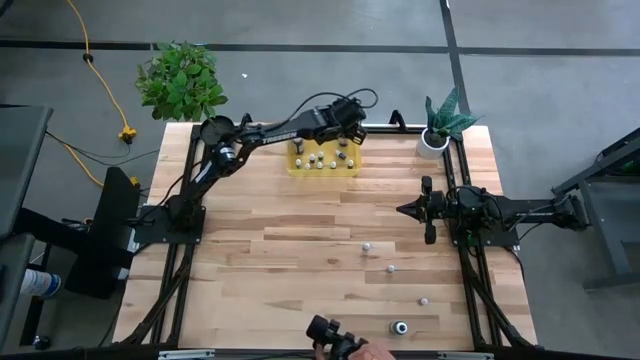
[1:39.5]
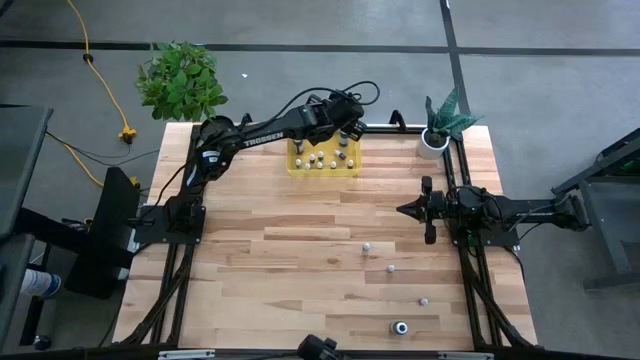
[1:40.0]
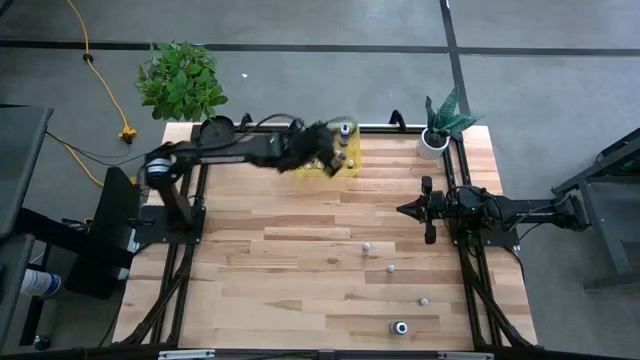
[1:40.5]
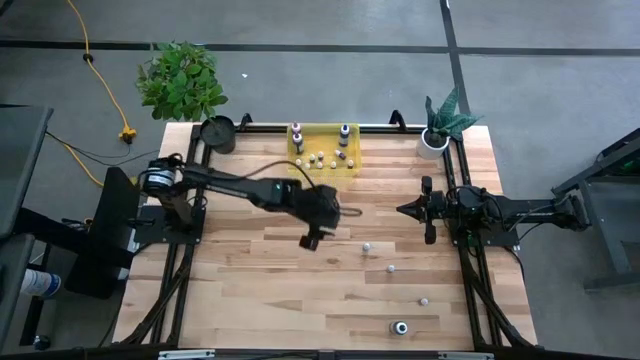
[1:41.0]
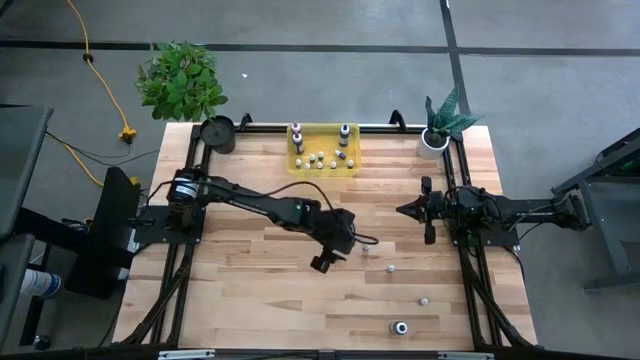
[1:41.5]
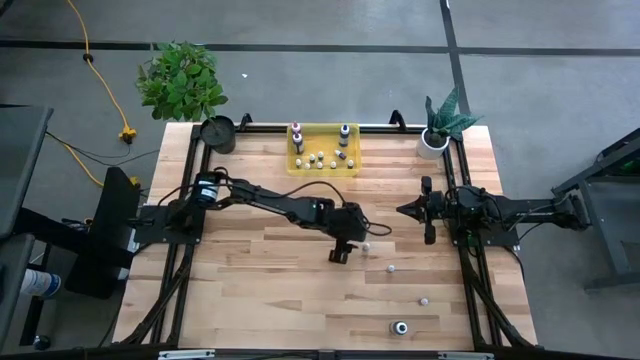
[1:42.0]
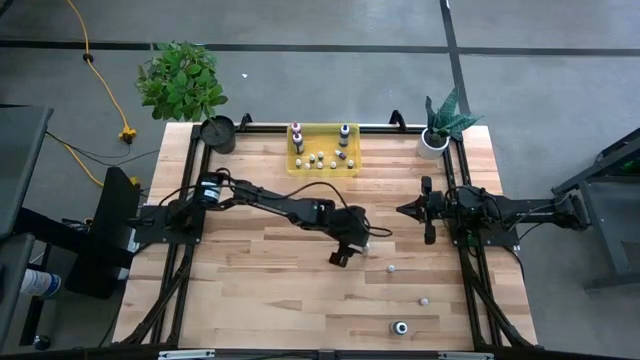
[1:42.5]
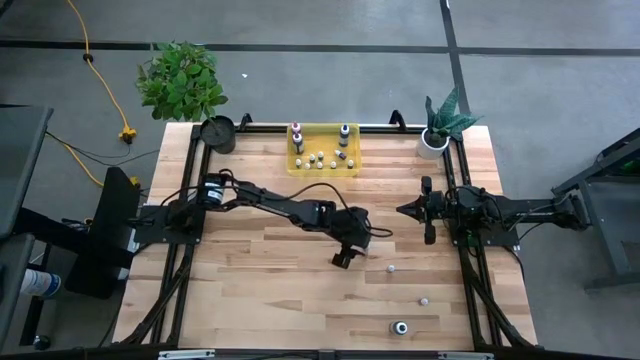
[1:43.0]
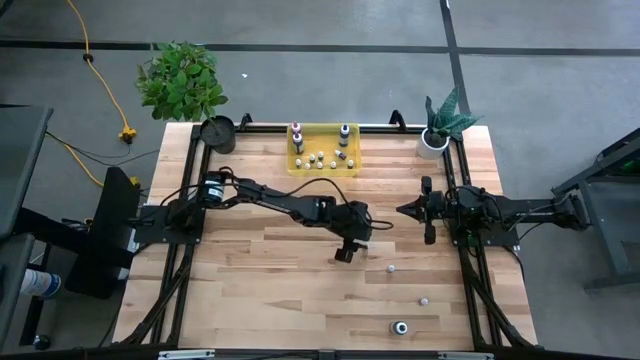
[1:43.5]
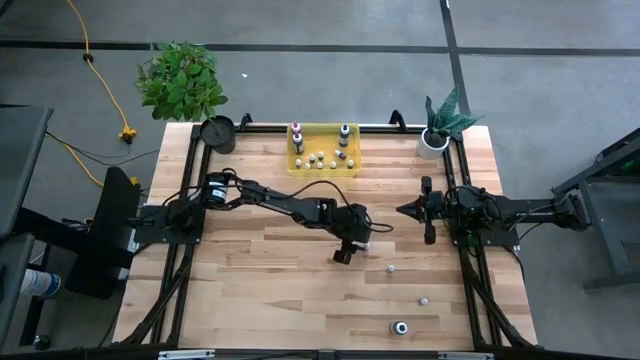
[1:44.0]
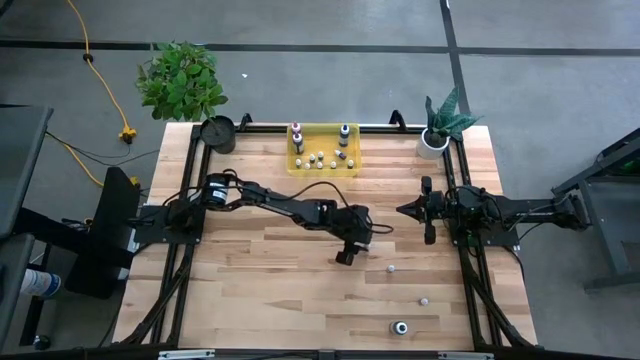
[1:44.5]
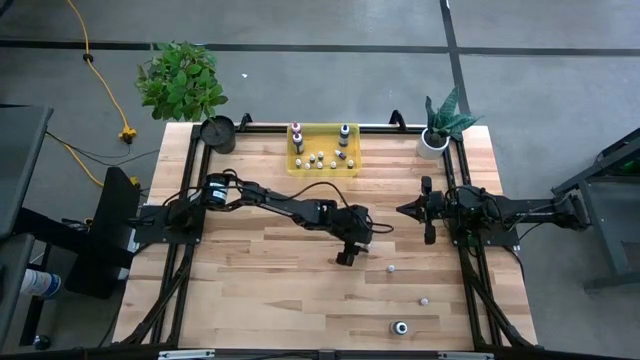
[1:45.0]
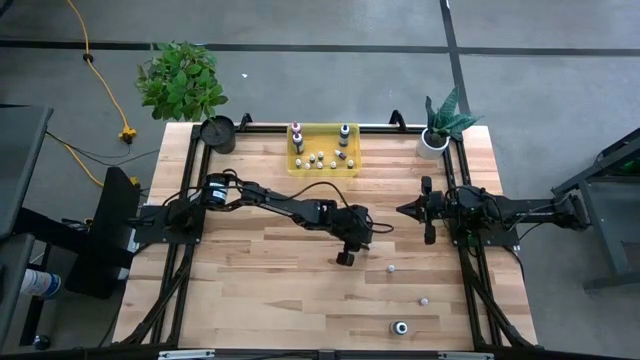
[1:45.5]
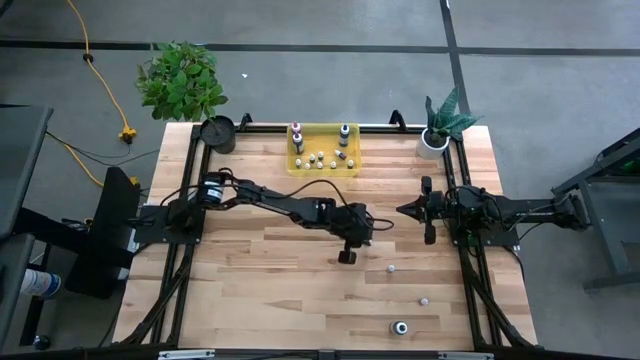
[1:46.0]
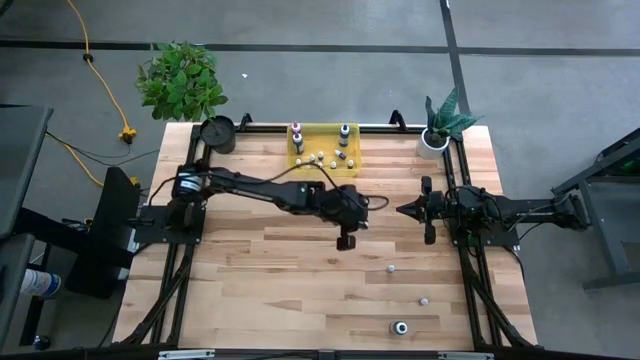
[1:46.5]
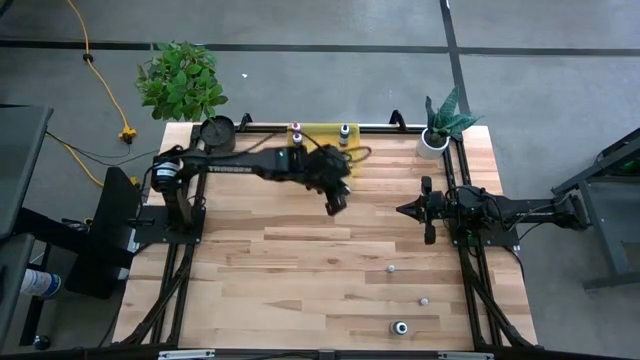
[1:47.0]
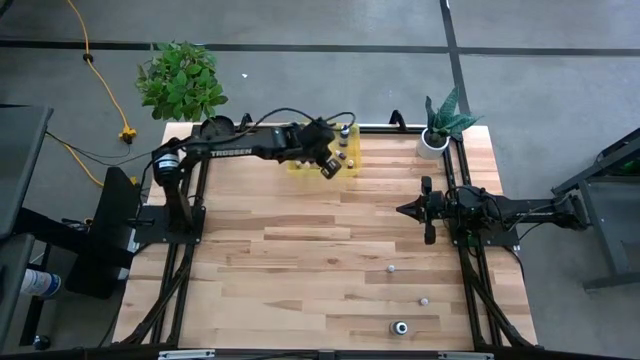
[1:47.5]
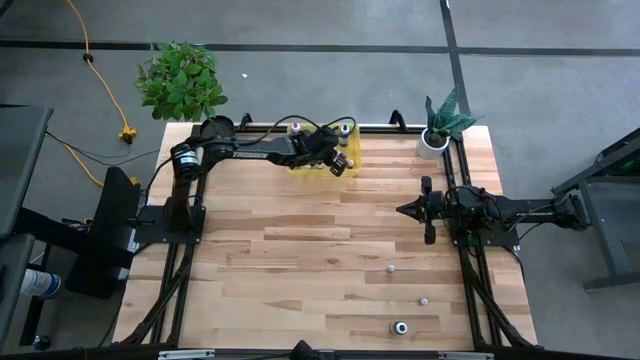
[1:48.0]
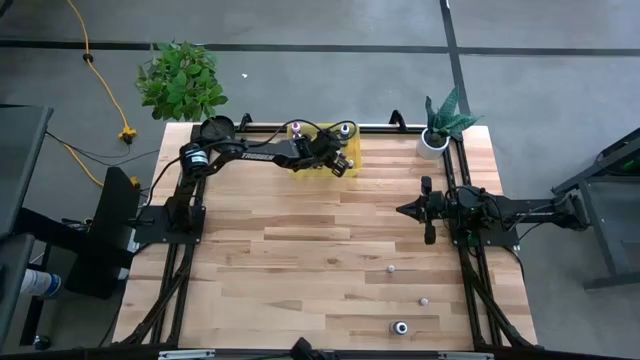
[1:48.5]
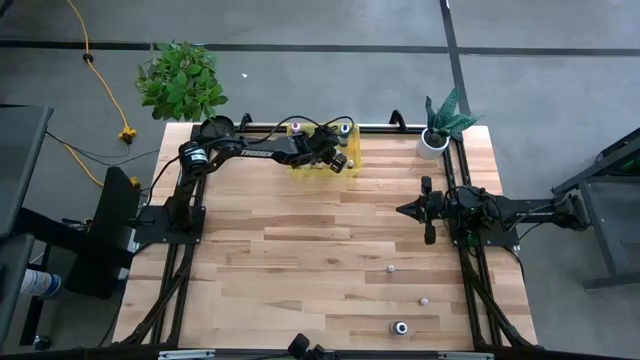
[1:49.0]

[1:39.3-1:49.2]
Task: Pick & Place food coloring
Put the small blue food coloring bottle into the yellow container

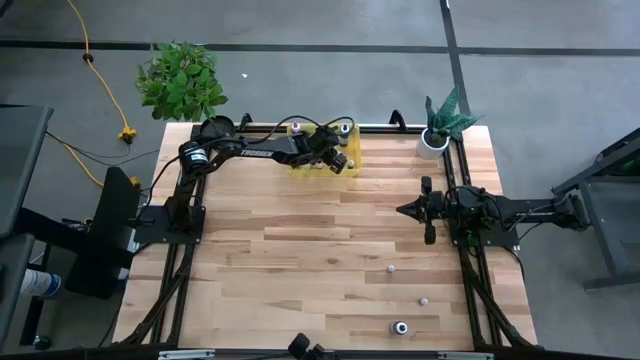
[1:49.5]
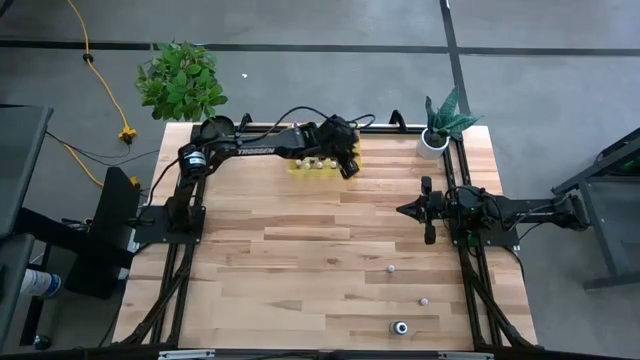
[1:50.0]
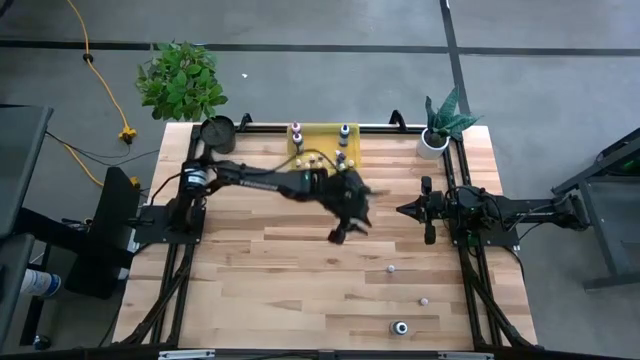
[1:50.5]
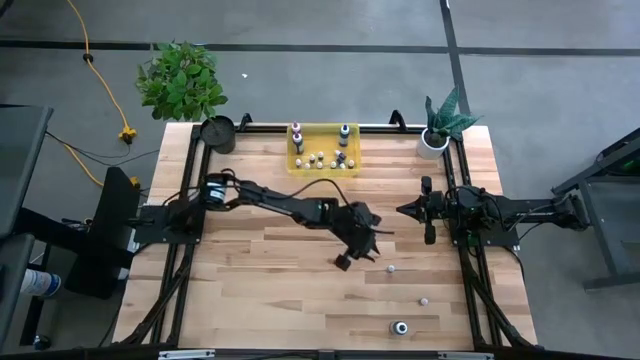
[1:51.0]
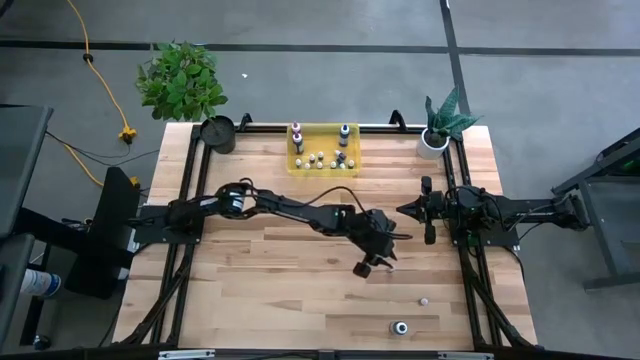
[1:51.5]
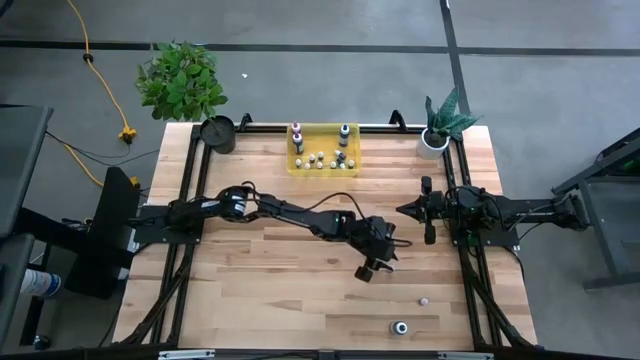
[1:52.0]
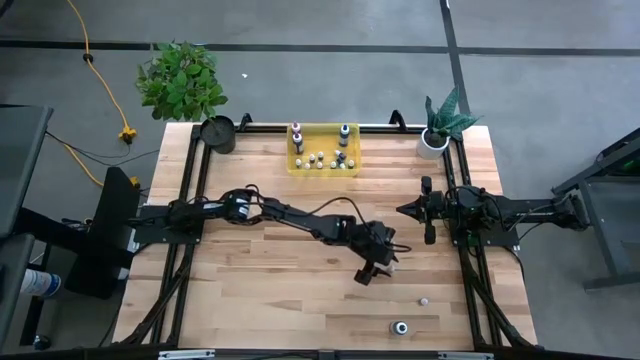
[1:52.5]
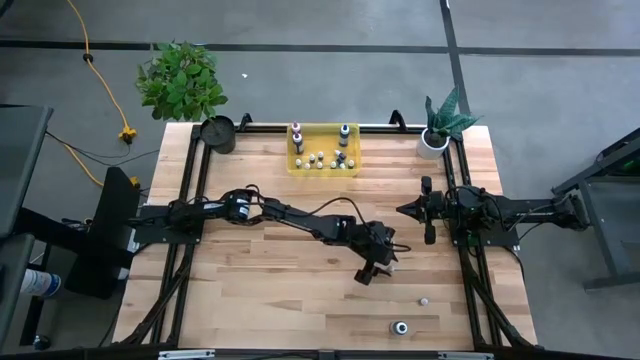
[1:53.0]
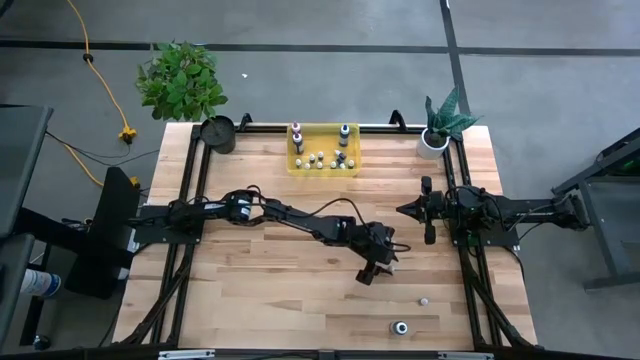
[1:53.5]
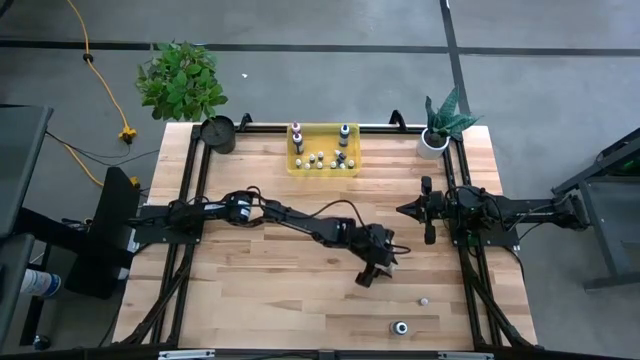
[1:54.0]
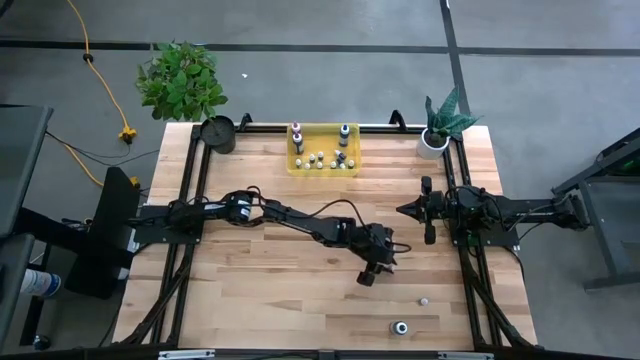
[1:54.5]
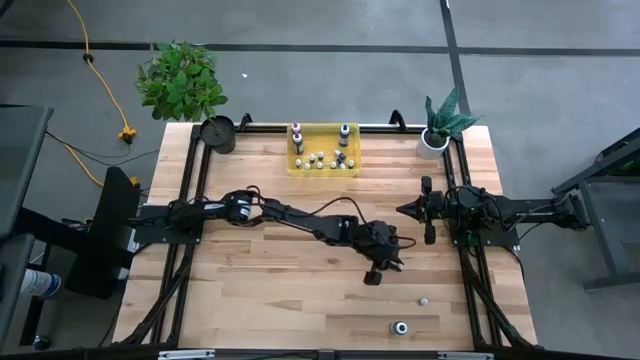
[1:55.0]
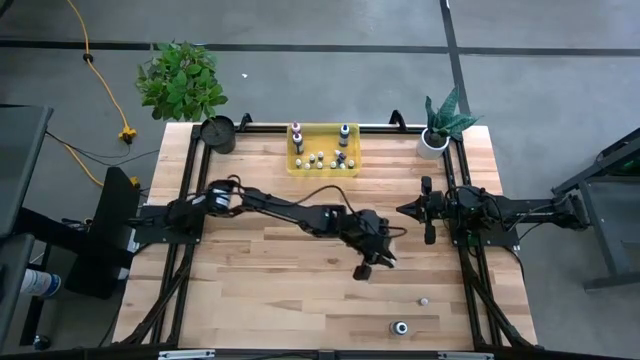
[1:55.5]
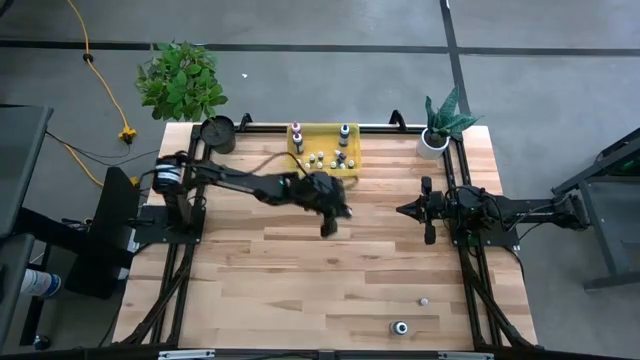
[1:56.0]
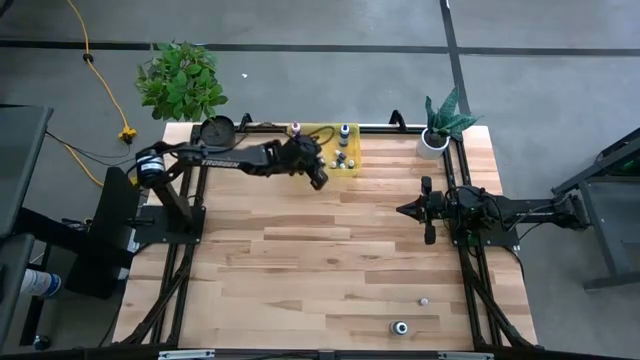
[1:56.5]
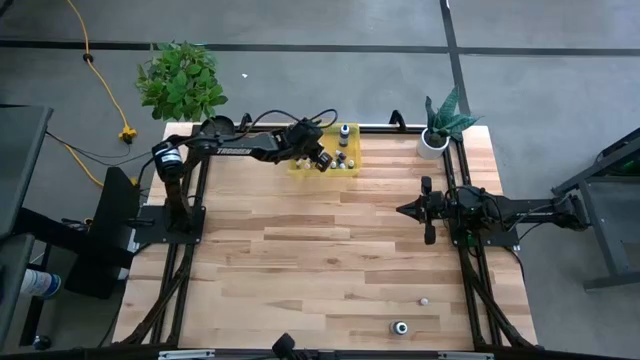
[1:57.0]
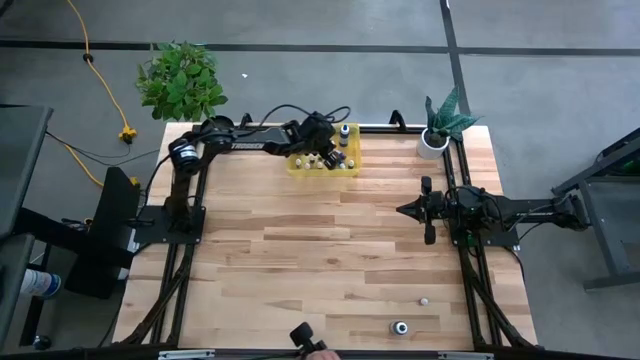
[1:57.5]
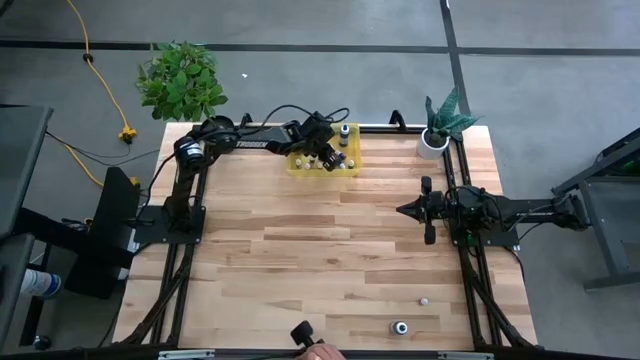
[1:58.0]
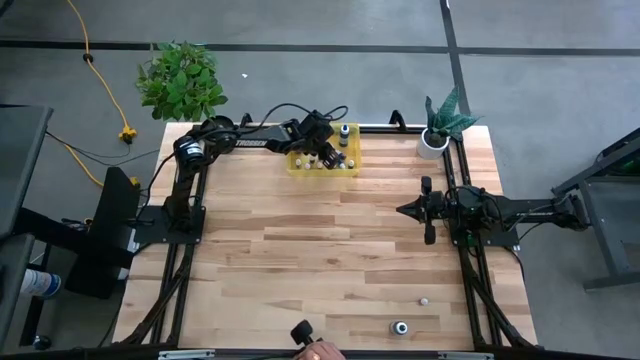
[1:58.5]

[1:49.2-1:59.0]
Put the top small red food coloring bottle into the yellow container

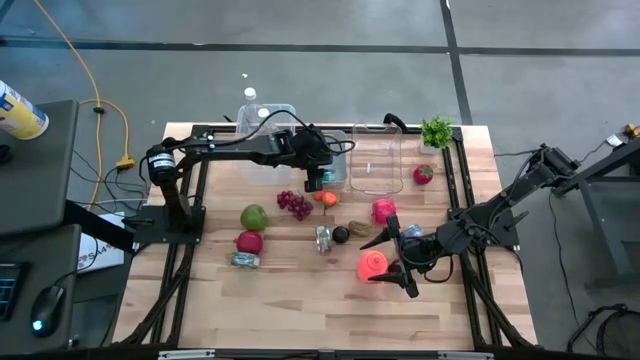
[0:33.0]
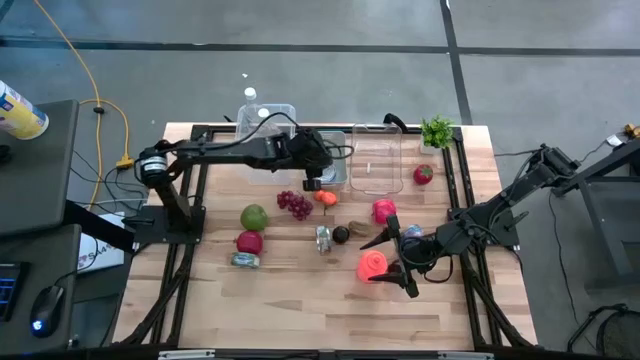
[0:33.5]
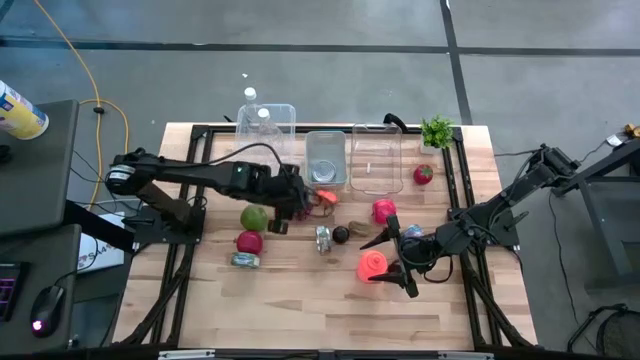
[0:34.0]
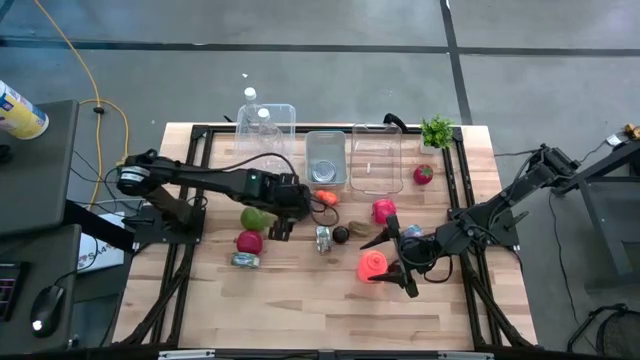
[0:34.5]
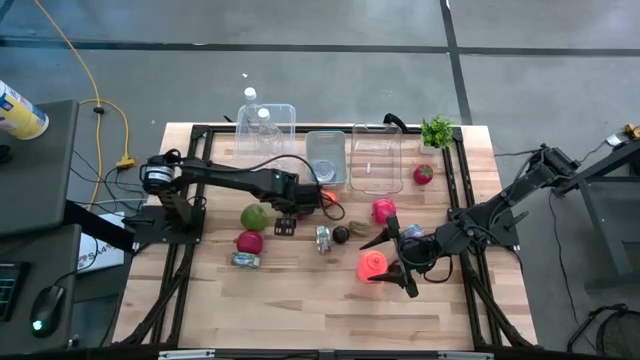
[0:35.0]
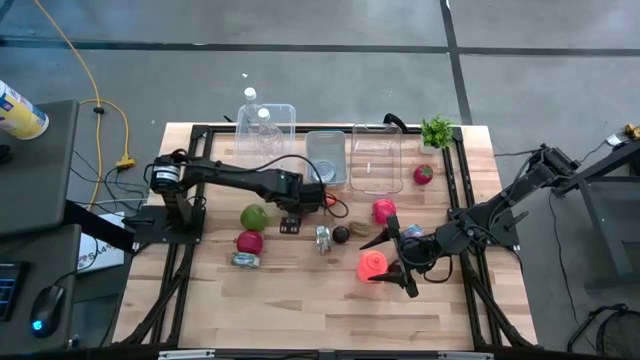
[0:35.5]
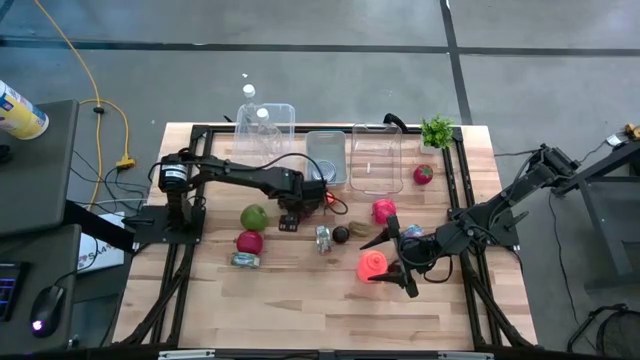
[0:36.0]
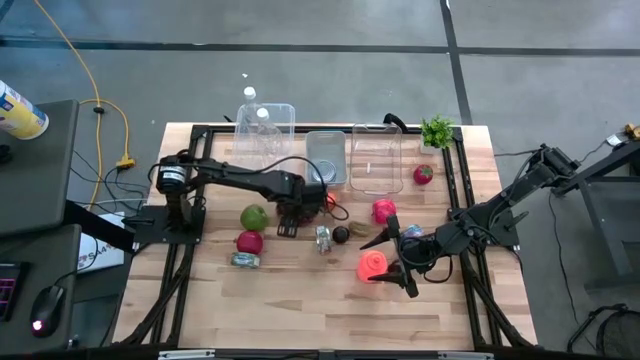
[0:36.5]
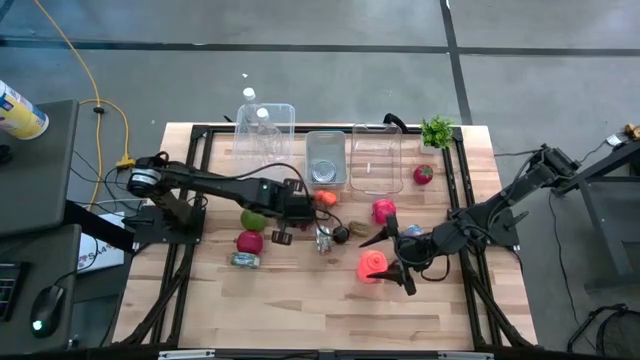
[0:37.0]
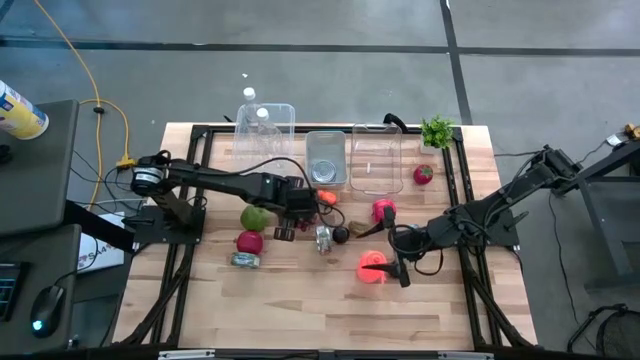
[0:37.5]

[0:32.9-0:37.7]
Task: Pick & Place Food Item
Put the grapes into the transparent bin
